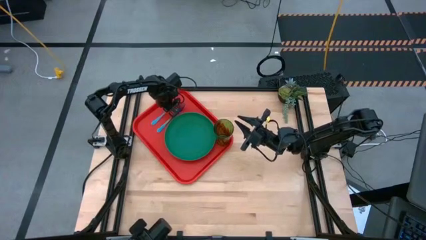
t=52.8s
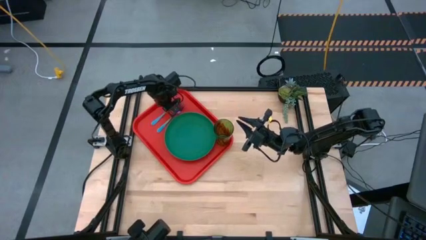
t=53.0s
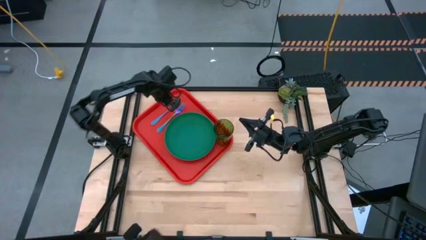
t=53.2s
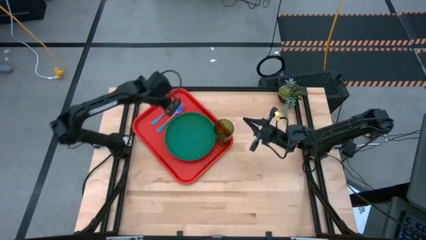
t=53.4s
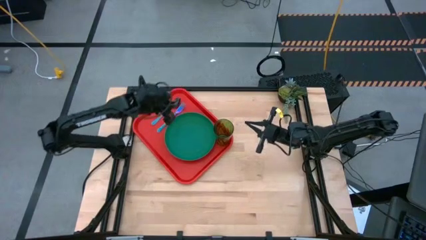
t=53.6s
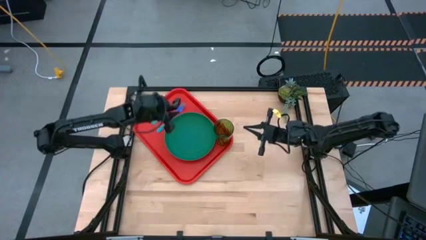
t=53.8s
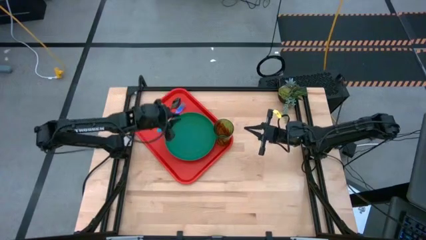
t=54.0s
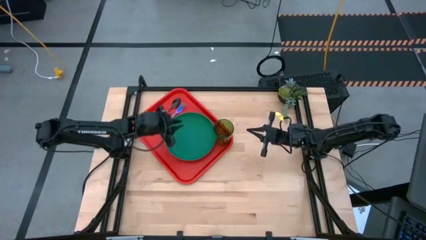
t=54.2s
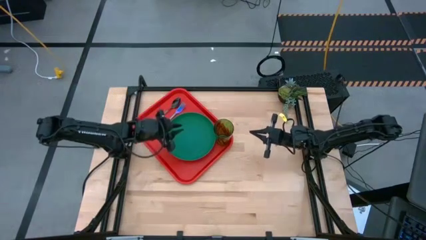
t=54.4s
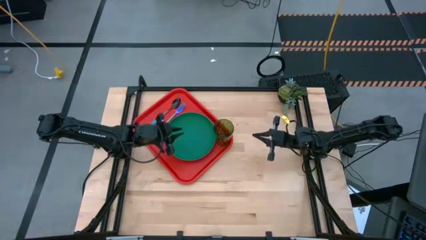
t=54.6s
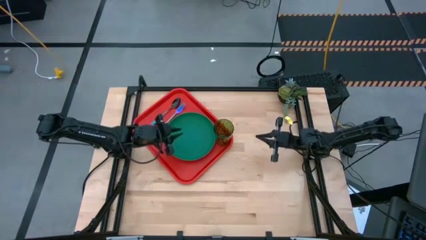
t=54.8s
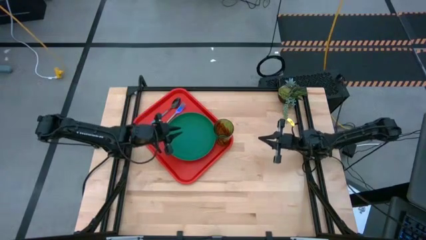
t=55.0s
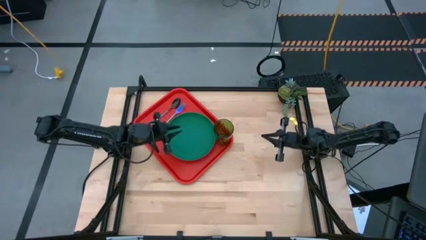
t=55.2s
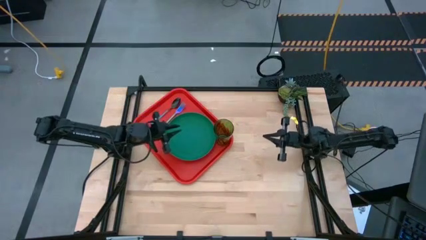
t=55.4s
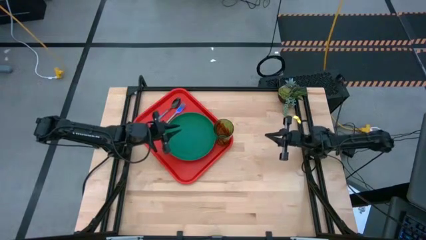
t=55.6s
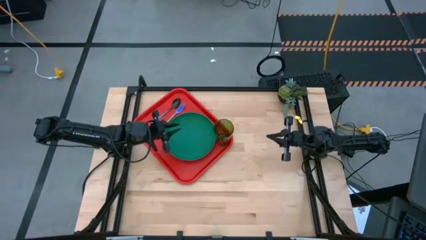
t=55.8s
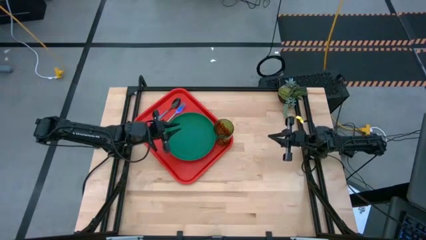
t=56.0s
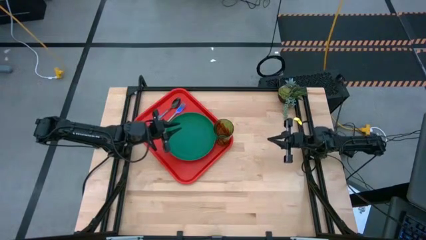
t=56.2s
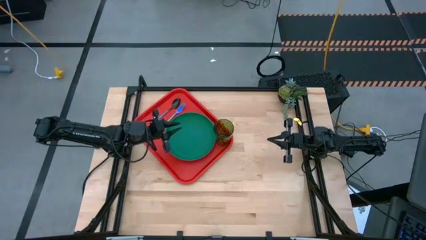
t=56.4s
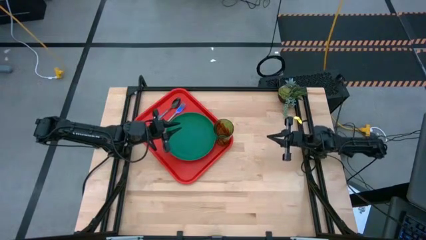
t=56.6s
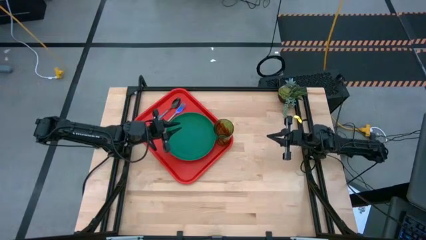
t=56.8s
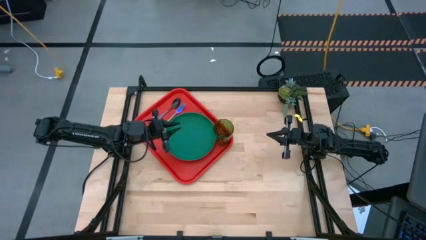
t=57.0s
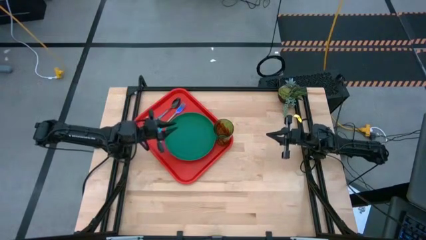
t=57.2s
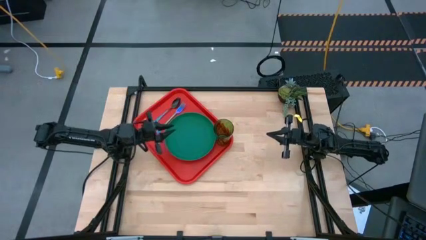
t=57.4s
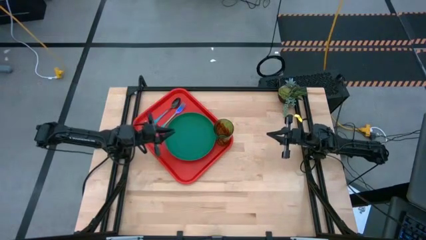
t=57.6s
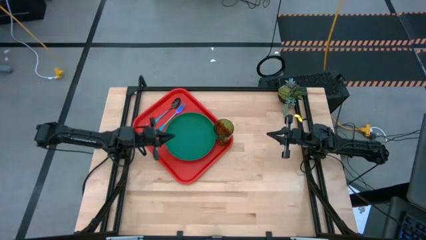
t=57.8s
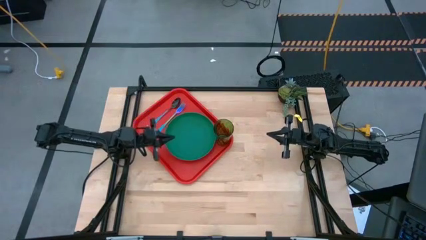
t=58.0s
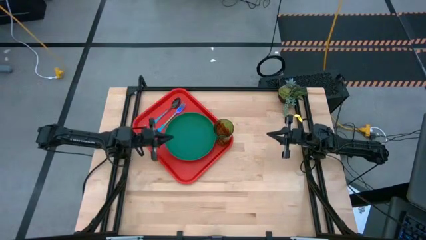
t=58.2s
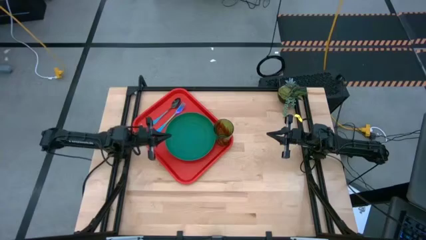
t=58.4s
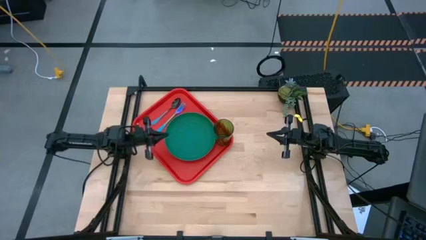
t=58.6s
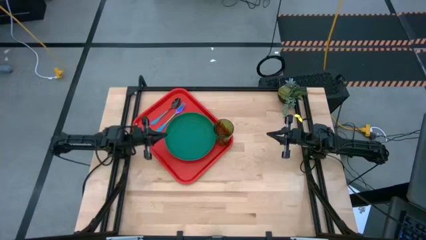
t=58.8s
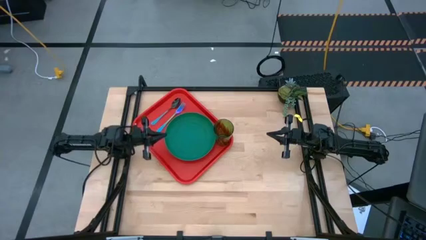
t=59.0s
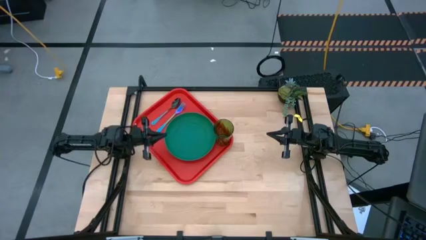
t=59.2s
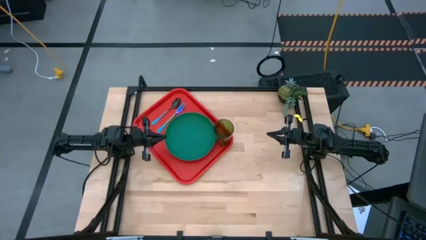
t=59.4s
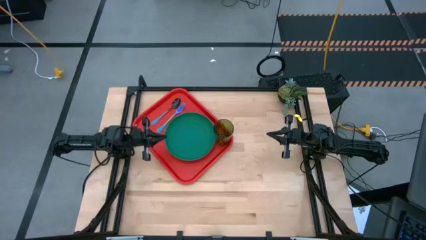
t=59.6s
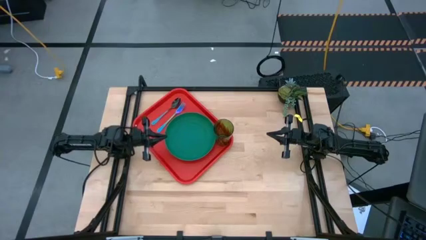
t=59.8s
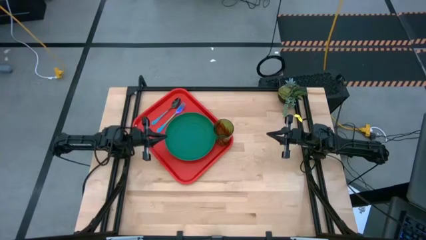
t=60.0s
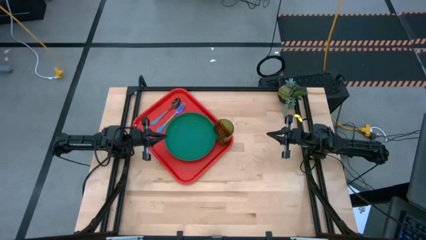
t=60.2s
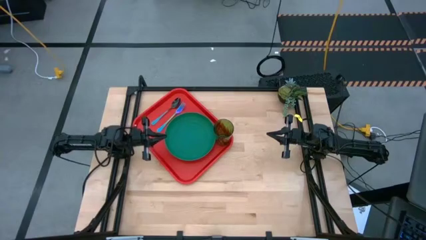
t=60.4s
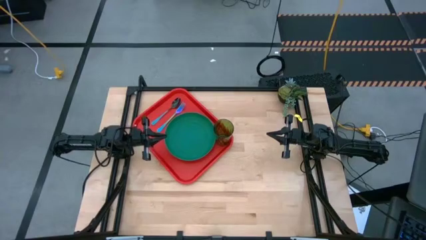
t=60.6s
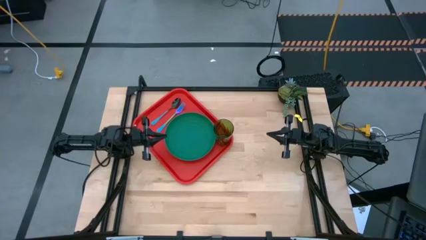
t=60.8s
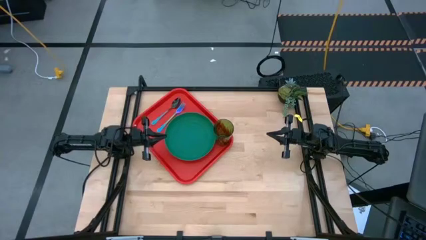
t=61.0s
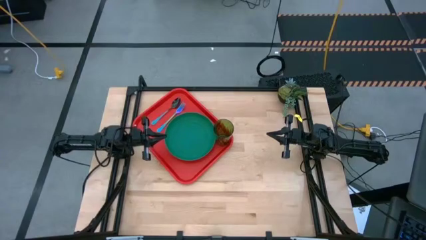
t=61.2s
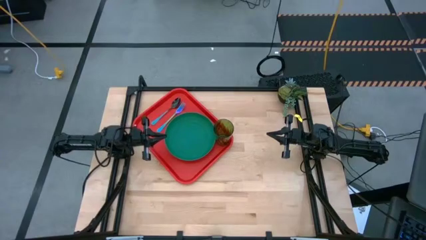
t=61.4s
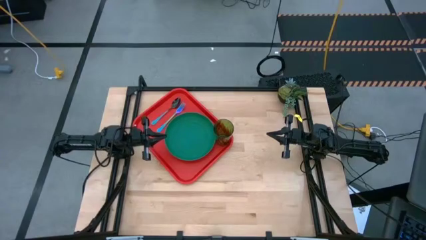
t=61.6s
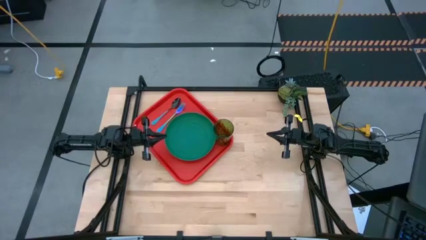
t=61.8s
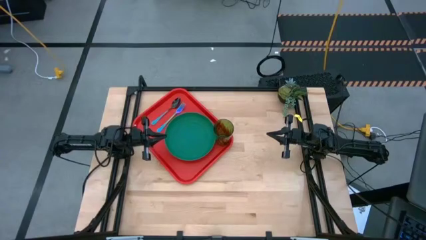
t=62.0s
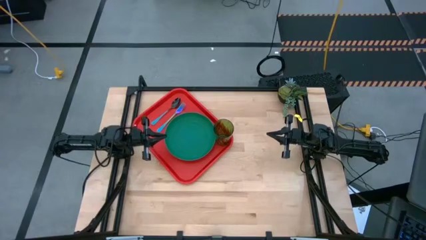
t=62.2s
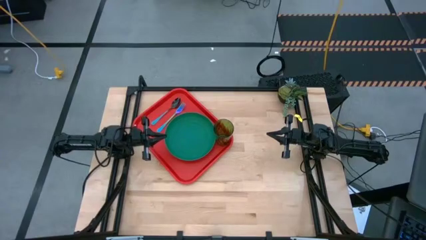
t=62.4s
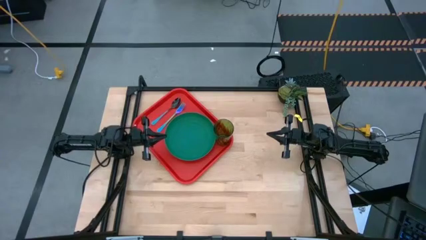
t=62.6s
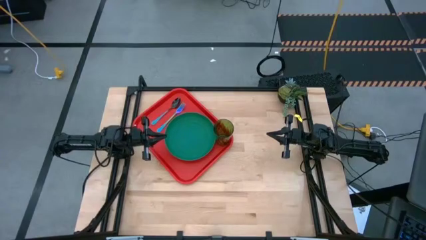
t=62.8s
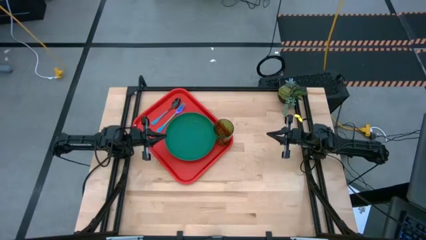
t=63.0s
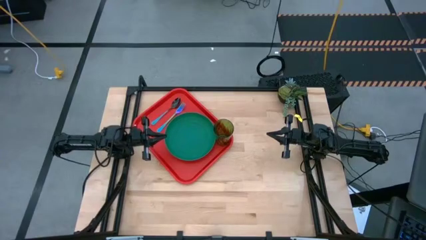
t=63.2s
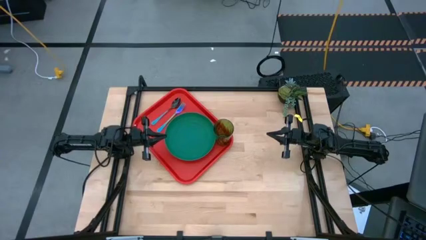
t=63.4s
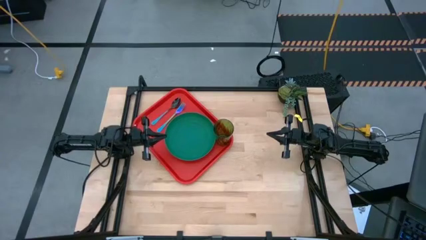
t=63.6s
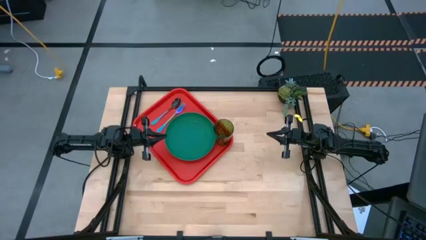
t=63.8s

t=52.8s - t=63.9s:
Task: Pick and place plate/cup/fork/spoon on tray
Return to Home Position
